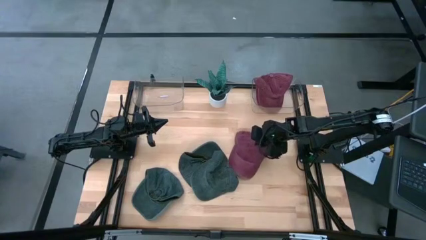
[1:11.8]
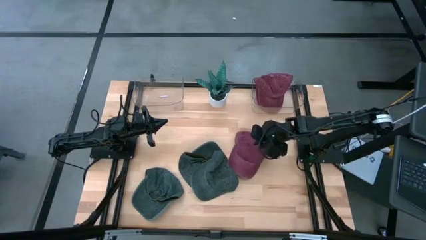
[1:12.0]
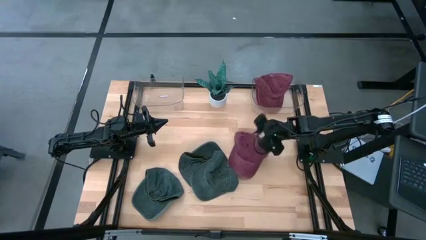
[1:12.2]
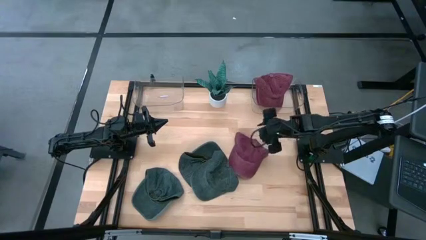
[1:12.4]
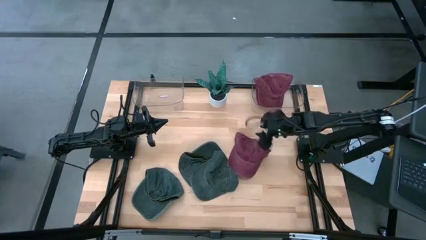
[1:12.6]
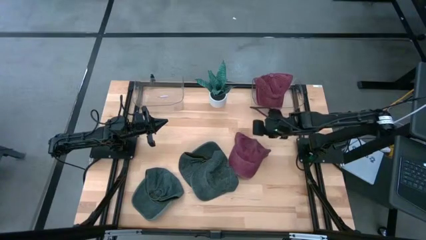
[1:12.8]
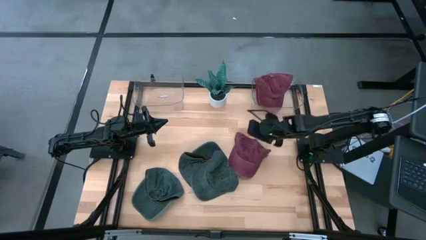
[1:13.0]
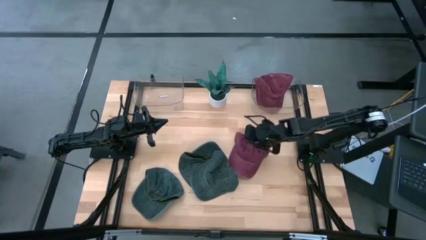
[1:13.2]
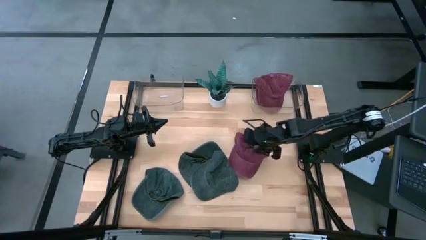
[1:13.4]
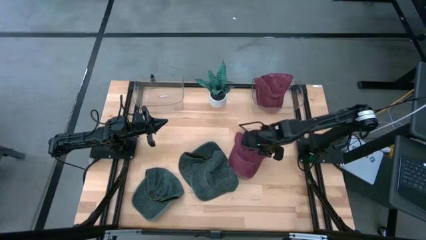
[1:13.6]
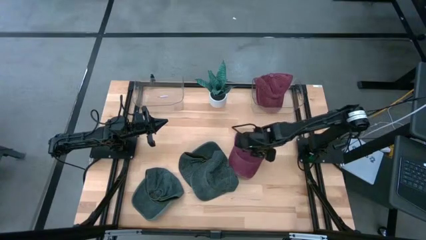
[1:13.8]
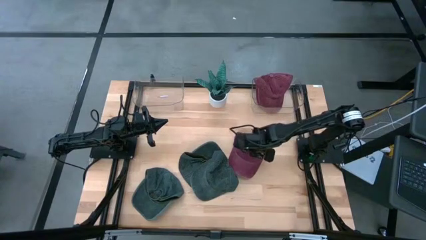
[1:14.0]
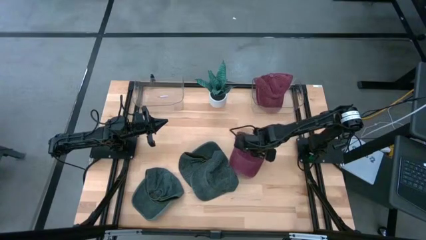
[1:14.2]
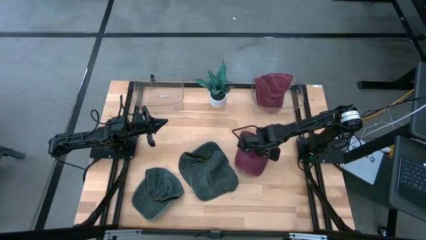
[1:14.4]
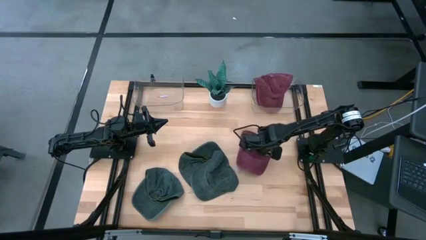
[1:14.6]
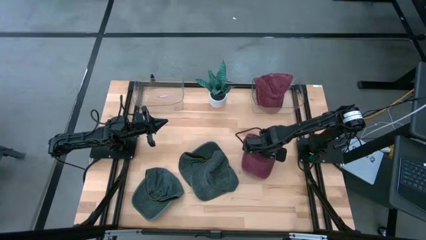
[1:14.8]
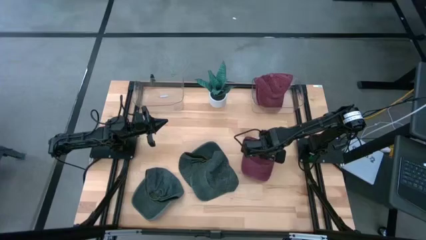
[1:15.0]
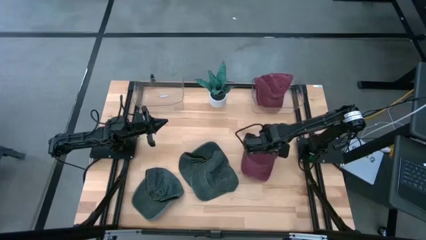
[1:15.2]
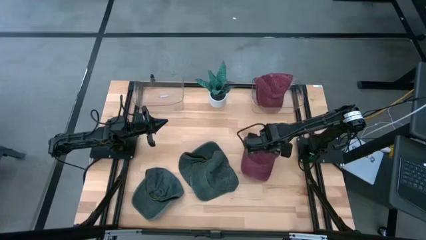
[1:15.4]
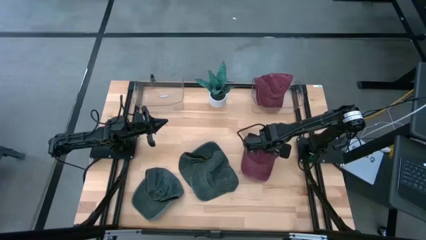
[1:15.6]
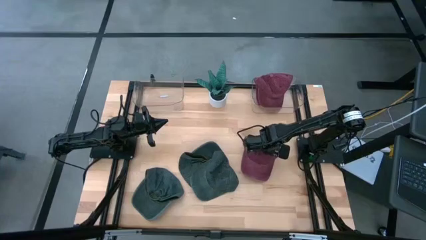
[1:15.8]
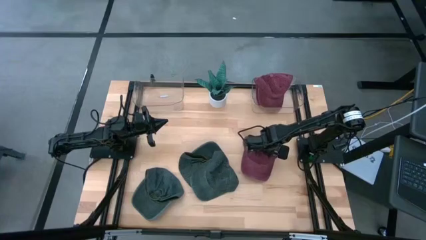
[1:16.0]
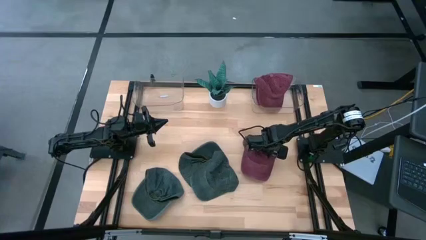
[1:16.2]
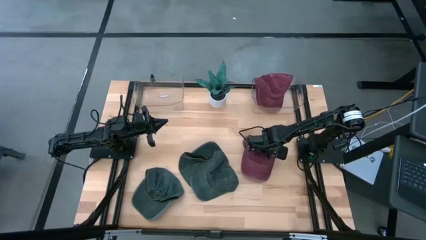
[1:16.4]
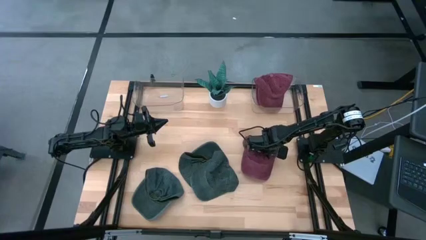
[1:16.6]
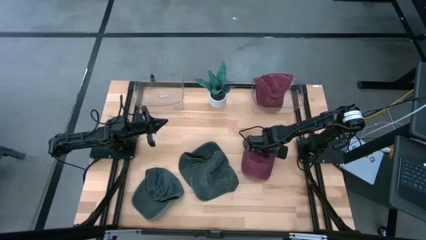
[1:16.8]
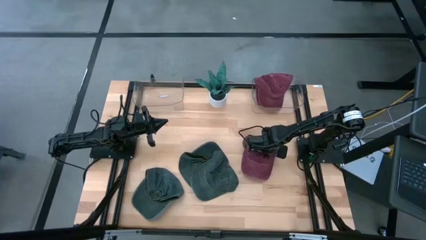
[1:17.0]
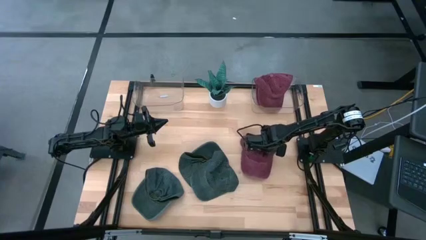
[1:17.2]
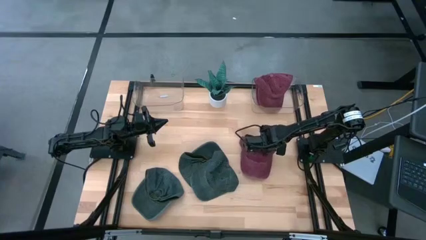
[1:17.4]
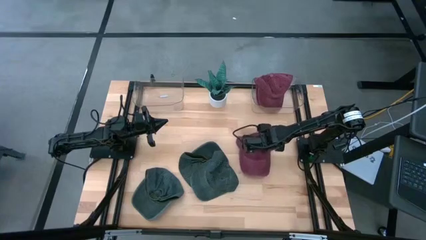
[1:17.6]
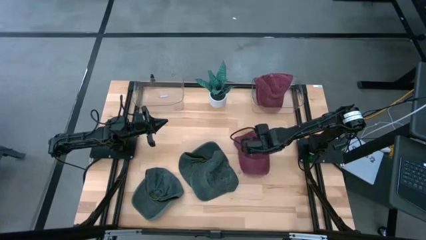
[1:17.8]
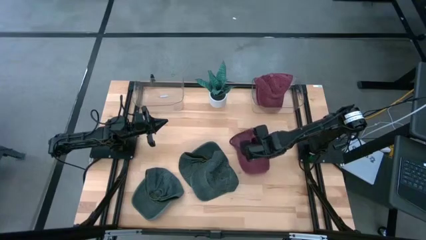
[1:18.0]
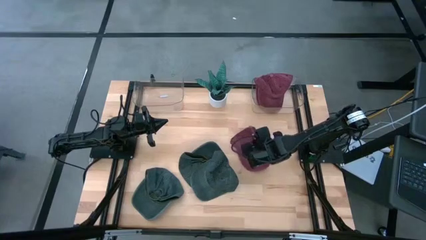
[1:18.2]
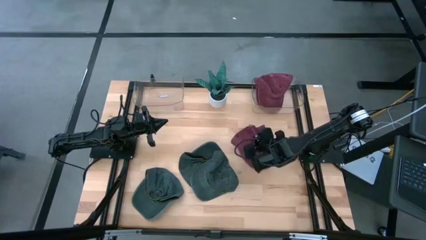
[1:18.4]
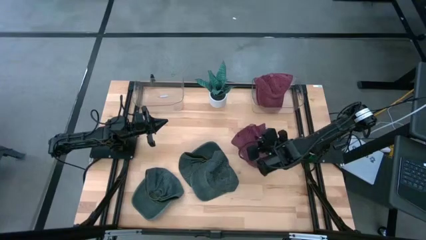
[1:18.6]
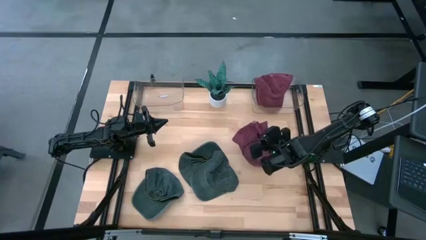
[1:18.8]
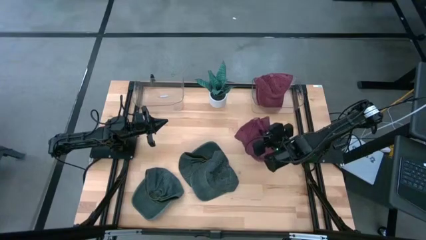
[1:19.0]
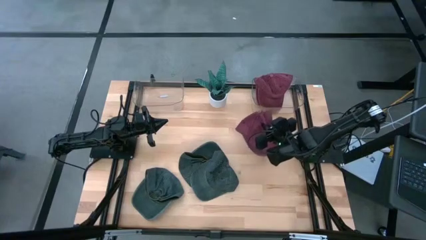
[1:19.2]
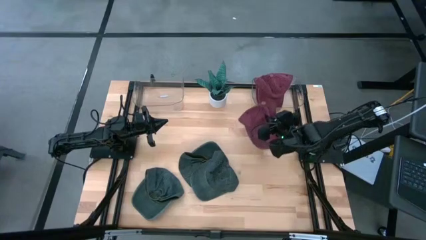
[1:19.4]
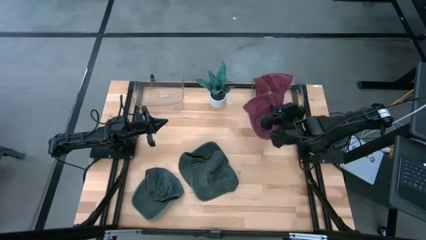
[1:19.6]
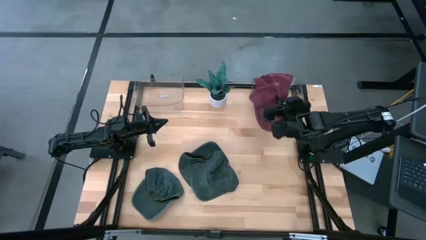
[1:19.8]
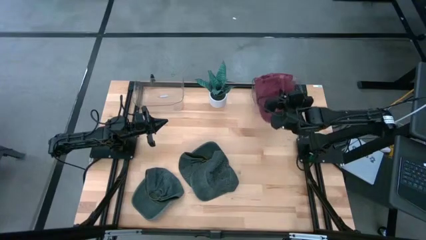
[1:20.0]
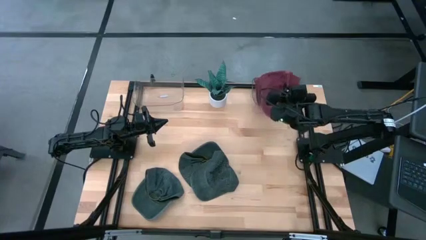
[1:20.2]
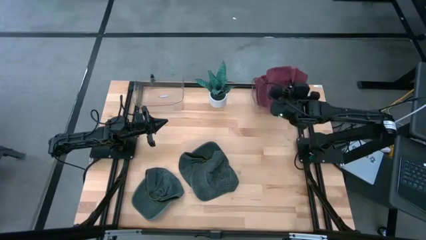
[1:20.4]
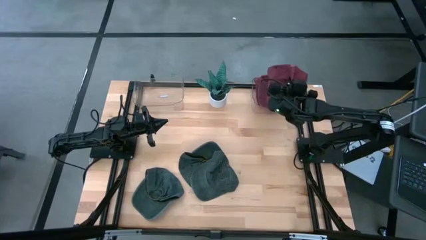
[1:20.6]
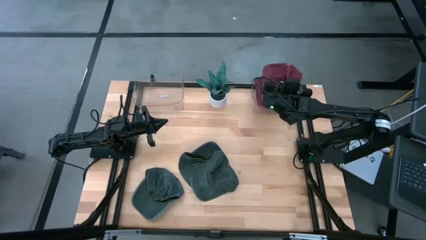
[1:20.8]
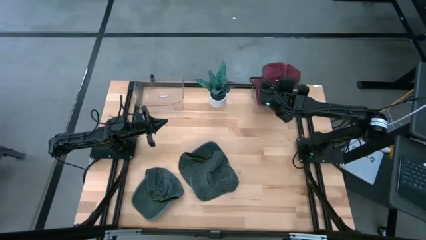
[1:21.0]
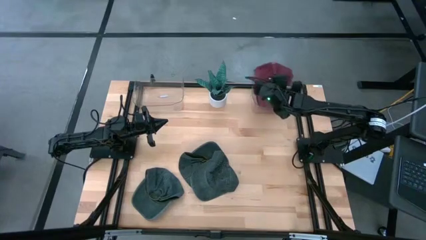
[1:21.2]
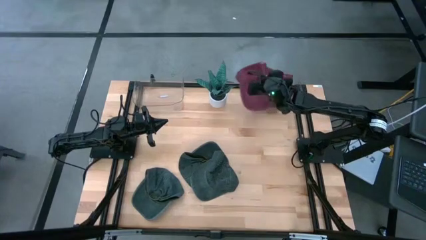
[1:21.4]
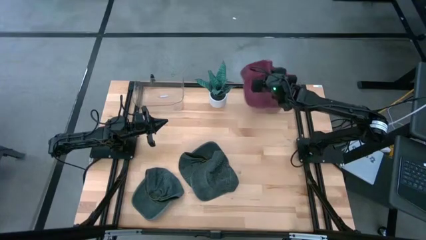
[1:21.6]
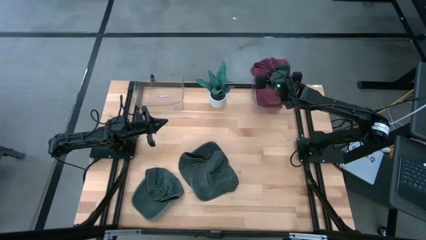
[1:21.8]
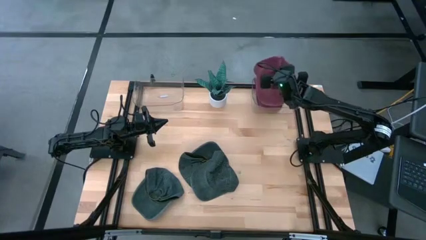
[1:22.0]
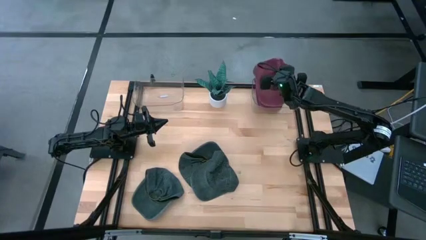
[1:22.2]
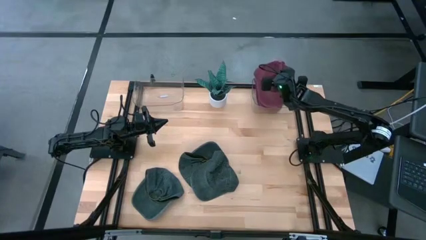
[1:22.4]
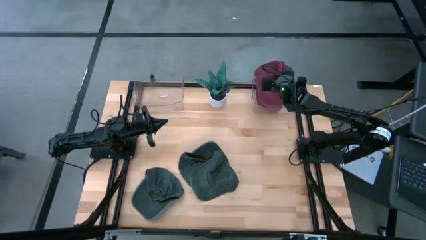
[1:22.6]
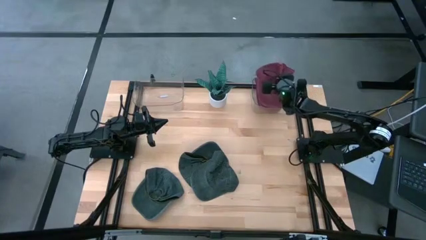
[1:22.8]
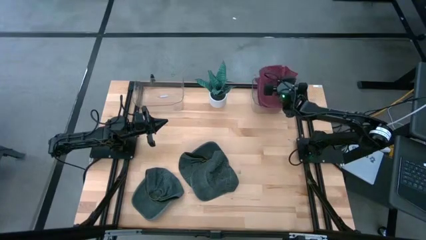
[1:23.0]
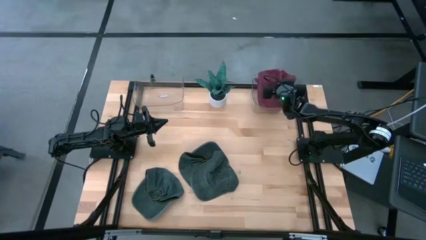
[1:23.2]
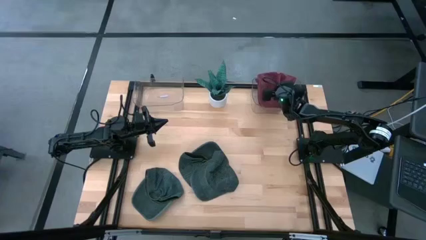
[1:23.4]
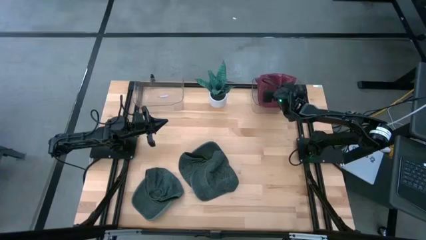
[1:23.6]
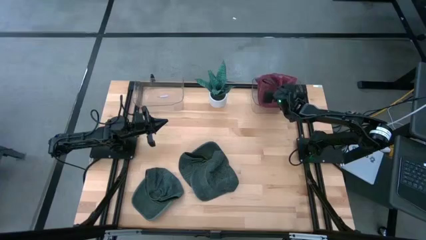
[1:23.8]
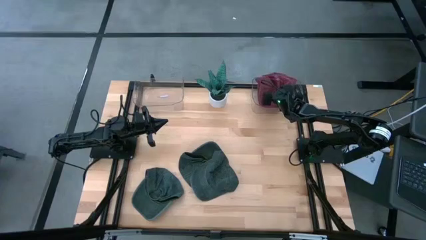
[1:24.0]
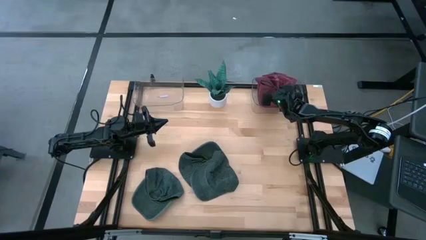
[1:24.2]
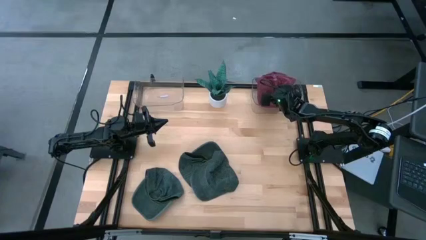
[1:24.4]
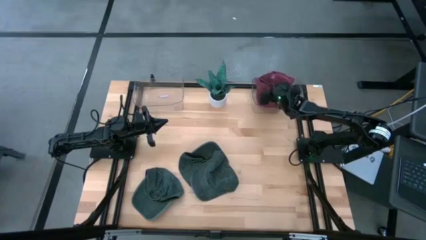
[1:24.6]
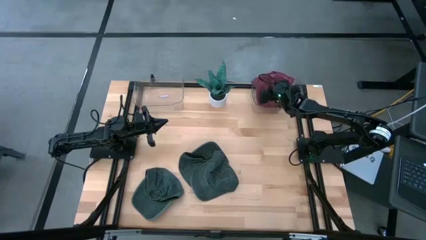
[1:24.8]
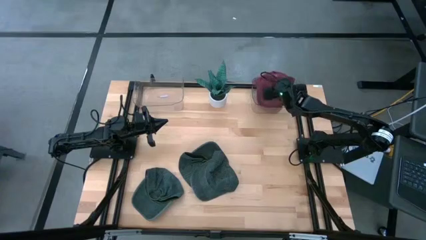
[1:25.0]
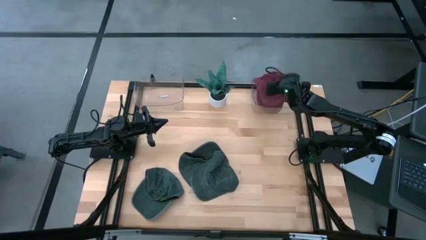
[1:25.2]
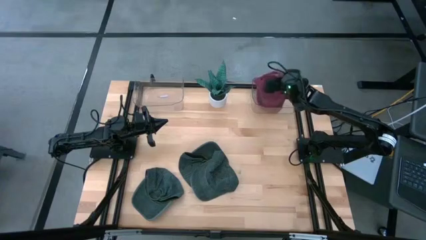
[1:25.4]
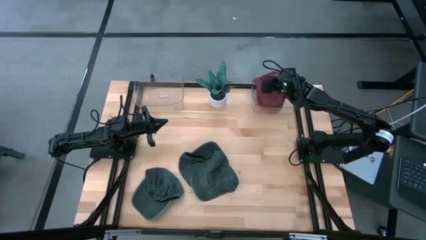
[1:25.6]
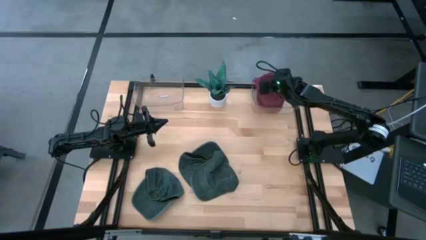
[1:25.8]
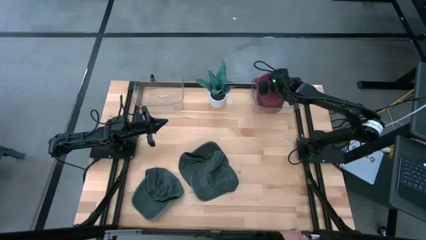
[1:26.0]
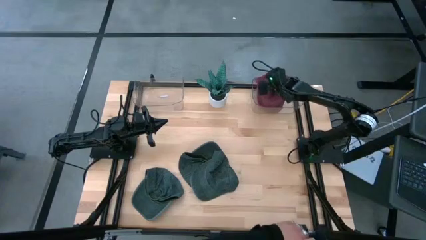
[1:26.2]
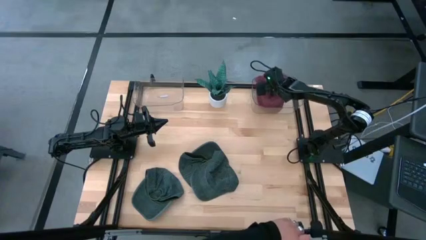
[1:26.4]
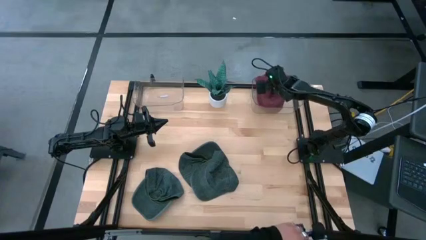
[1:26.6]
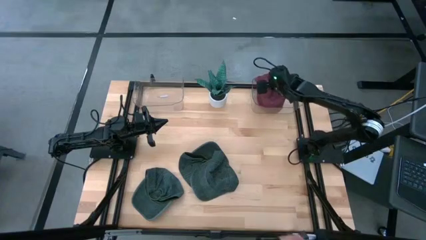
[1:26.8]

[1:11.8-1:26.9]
Task: Pick & Place hat
Put the red cap into the right transparent bin
